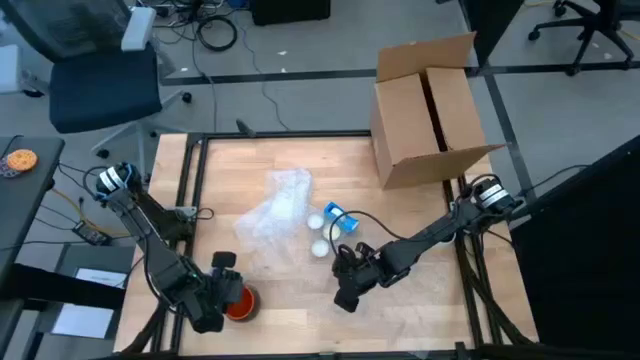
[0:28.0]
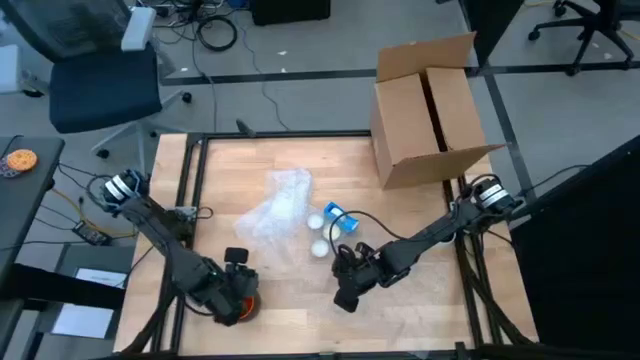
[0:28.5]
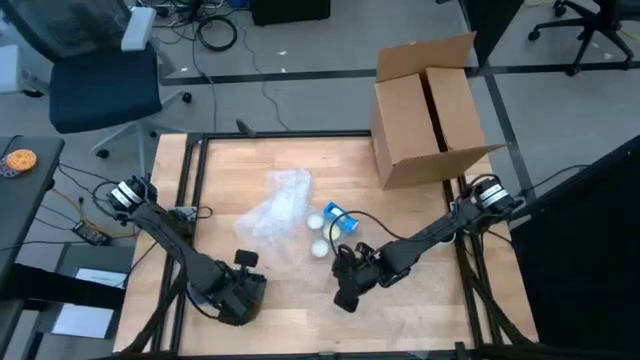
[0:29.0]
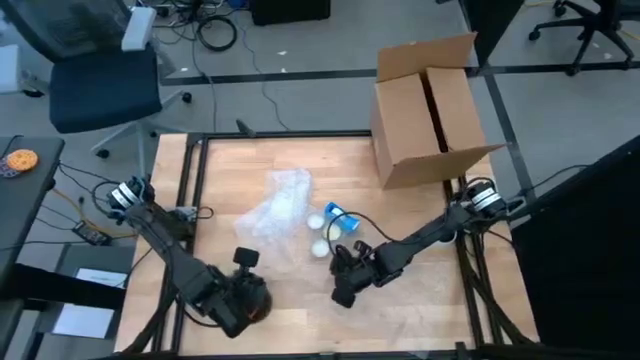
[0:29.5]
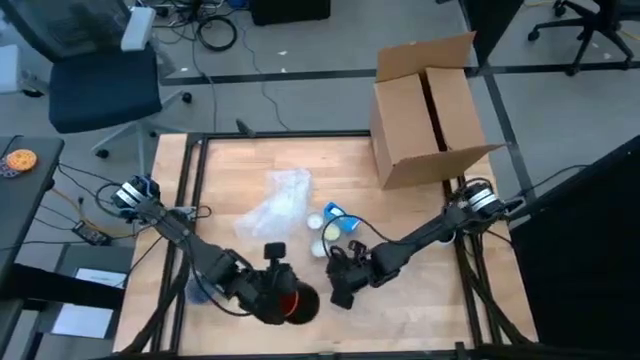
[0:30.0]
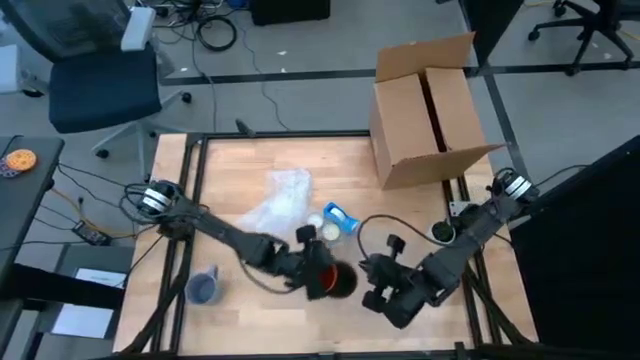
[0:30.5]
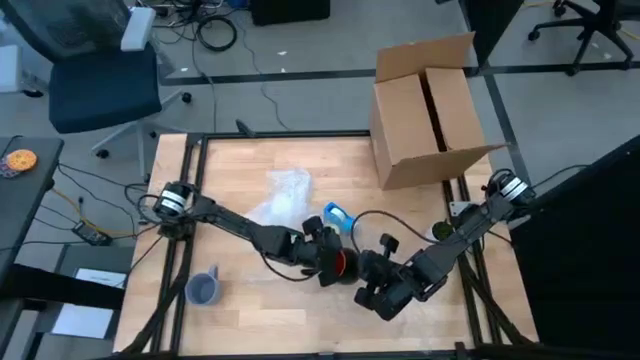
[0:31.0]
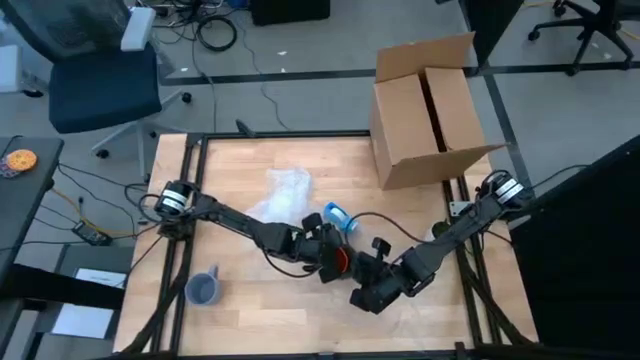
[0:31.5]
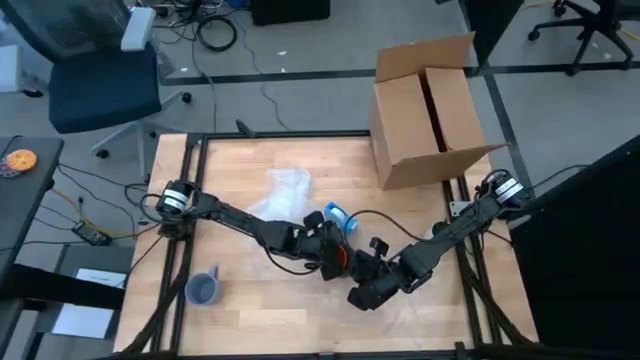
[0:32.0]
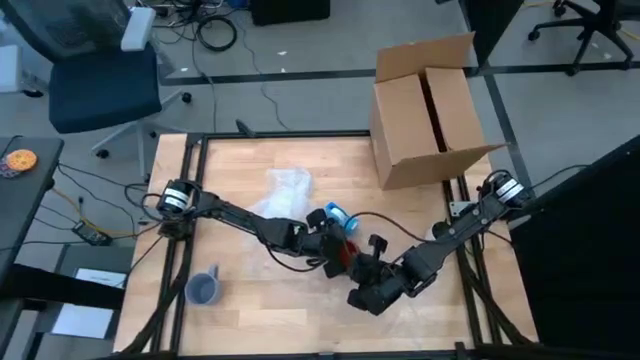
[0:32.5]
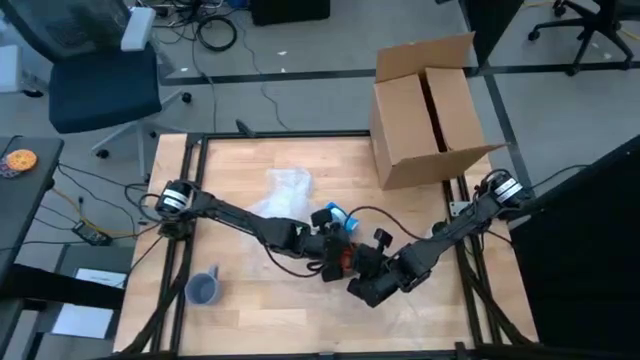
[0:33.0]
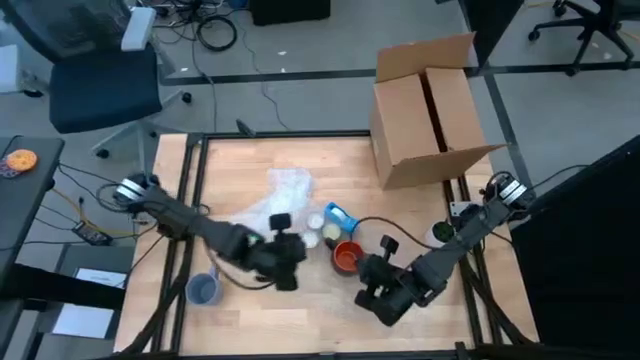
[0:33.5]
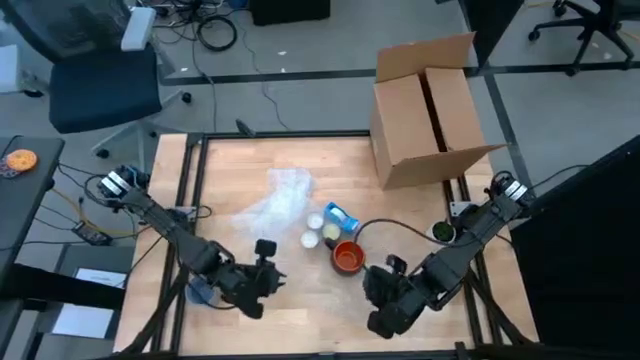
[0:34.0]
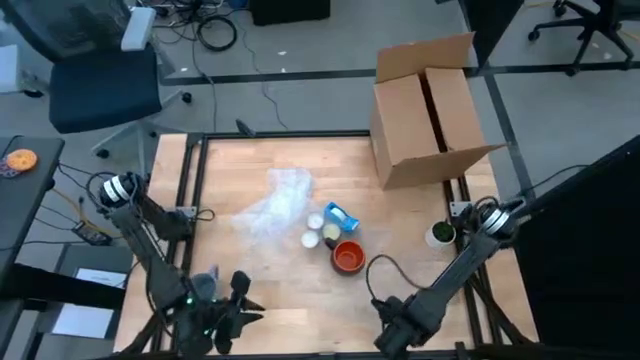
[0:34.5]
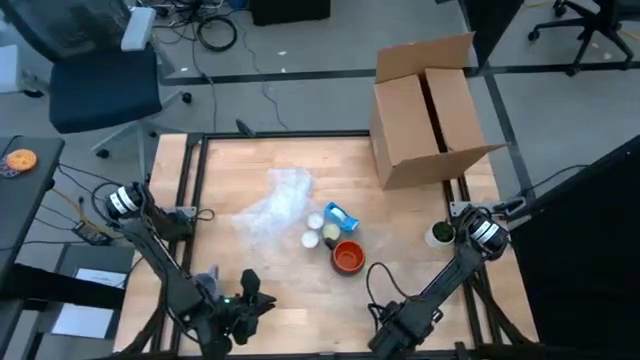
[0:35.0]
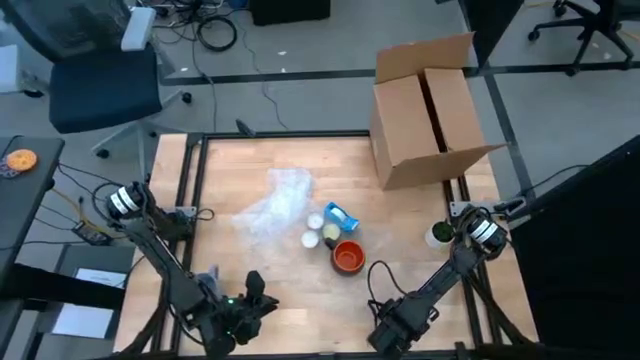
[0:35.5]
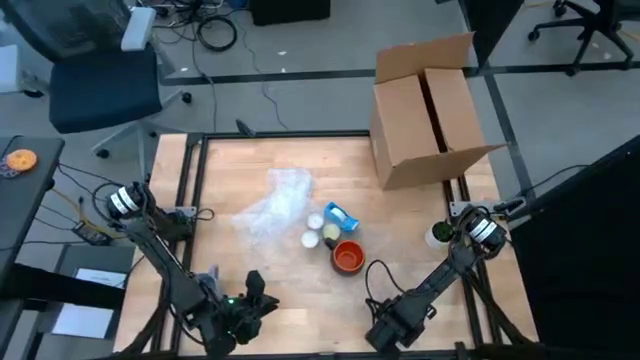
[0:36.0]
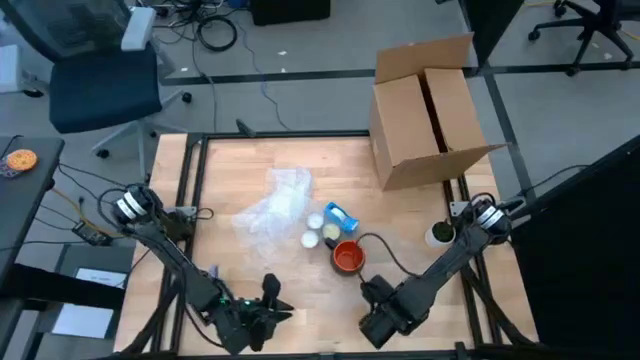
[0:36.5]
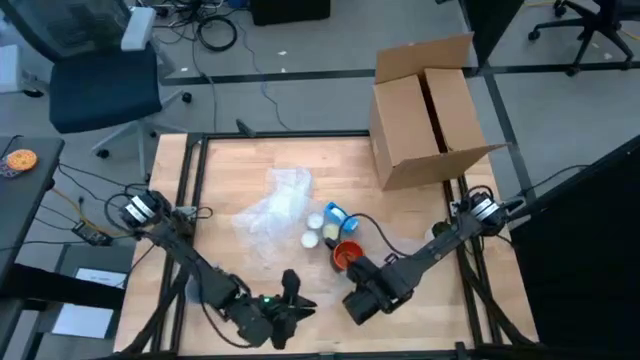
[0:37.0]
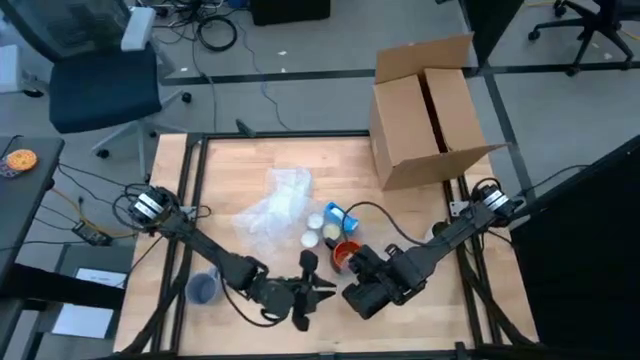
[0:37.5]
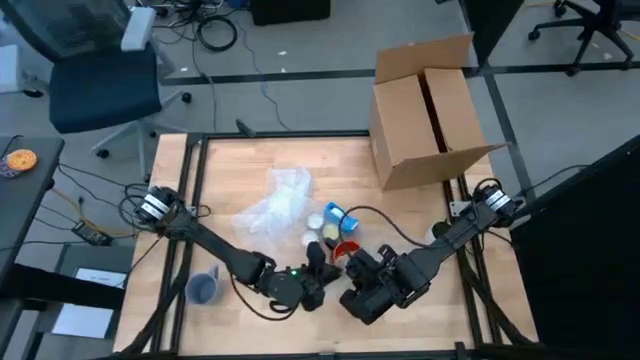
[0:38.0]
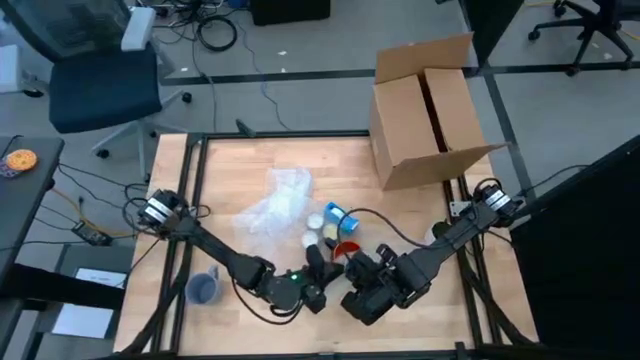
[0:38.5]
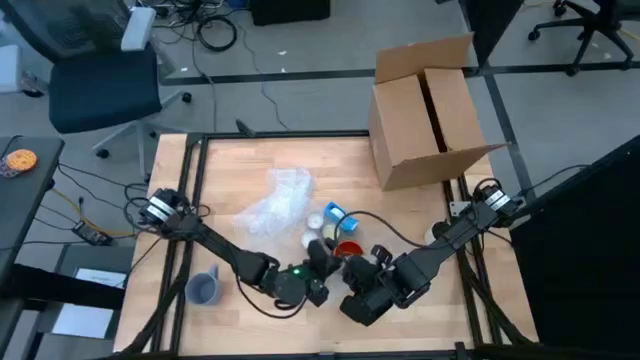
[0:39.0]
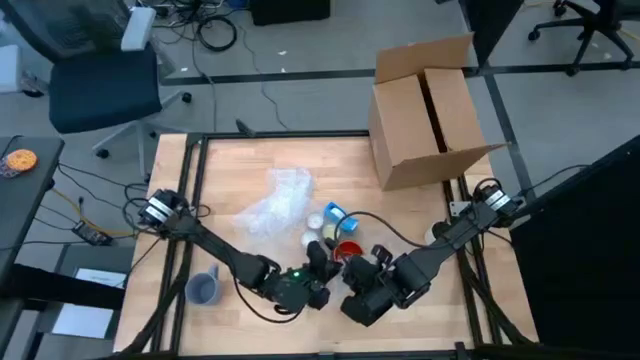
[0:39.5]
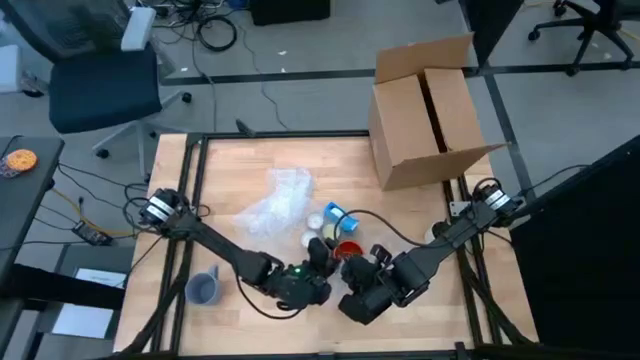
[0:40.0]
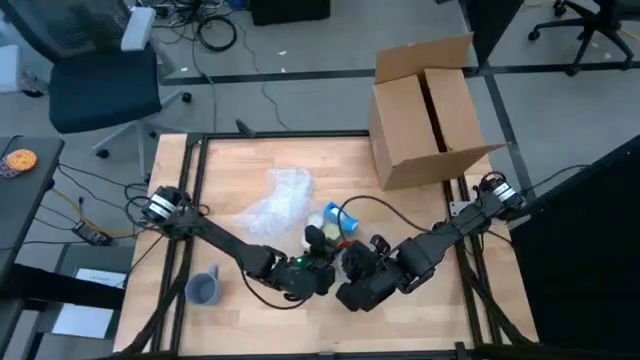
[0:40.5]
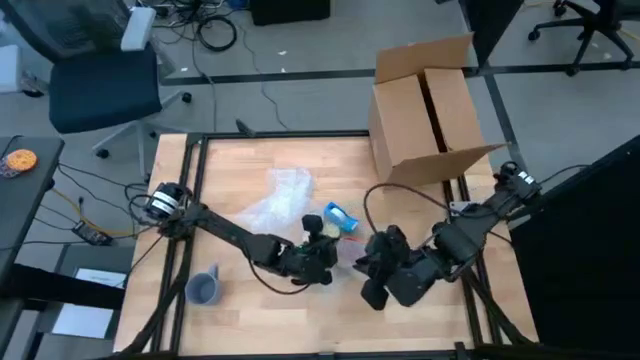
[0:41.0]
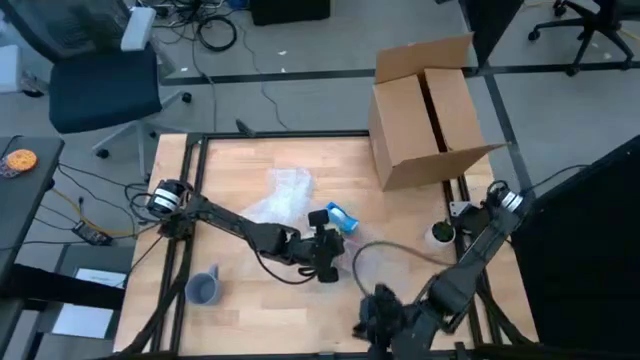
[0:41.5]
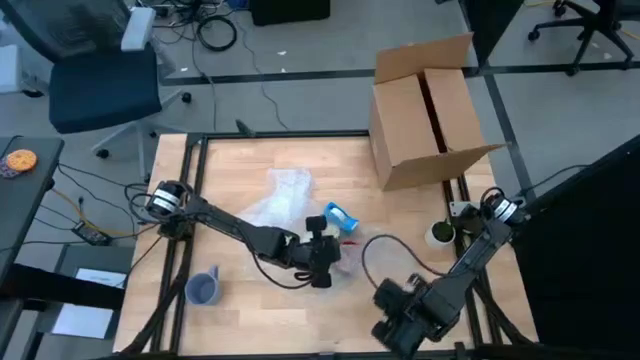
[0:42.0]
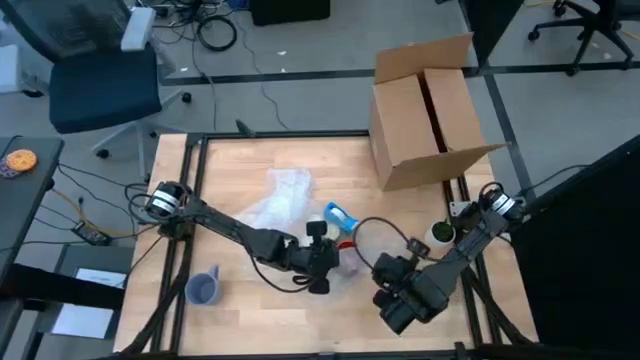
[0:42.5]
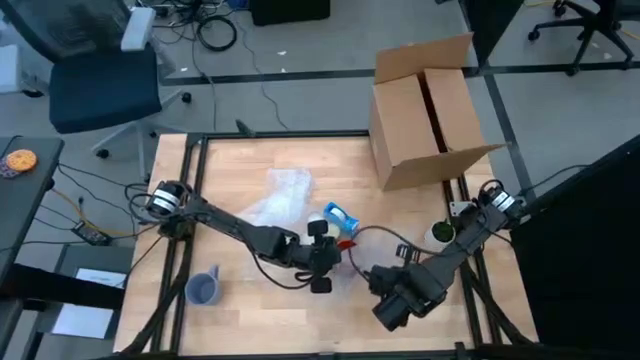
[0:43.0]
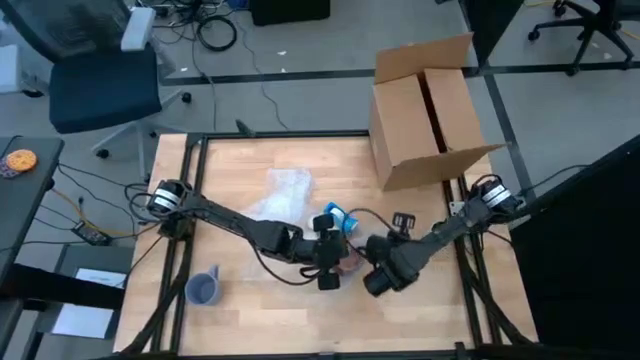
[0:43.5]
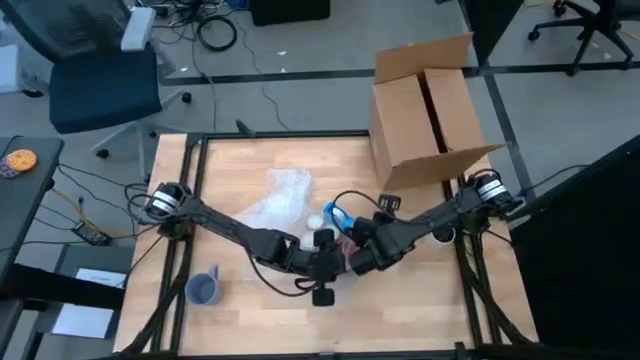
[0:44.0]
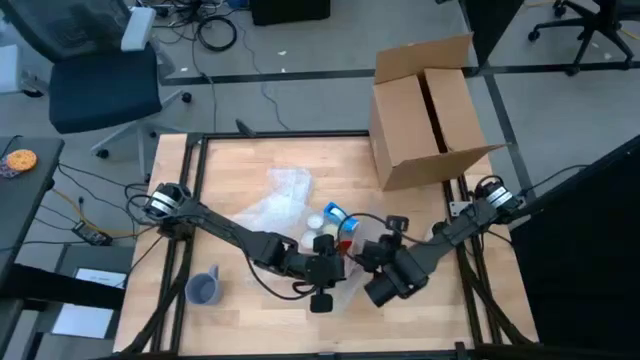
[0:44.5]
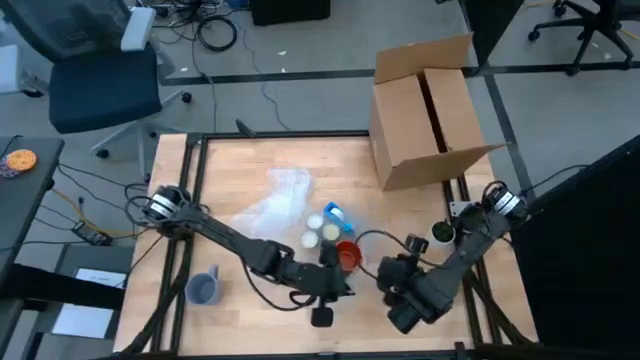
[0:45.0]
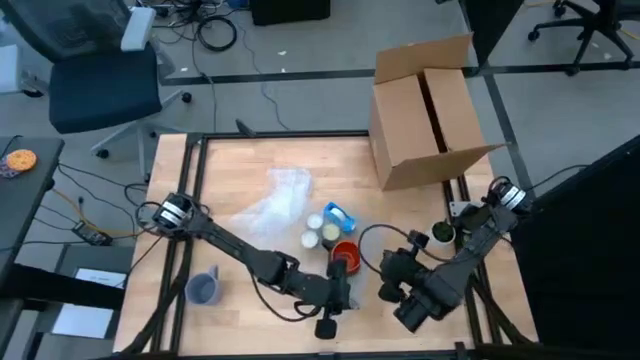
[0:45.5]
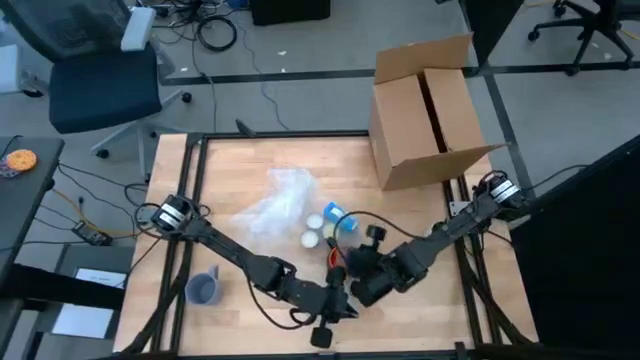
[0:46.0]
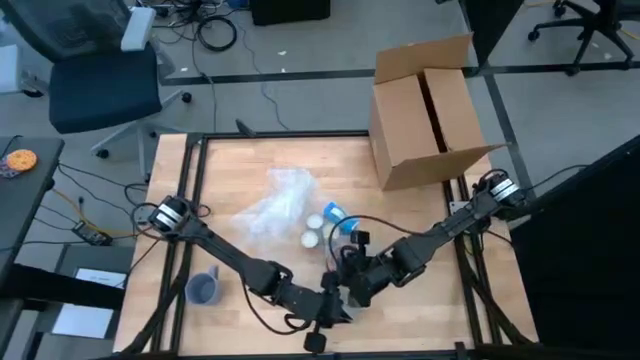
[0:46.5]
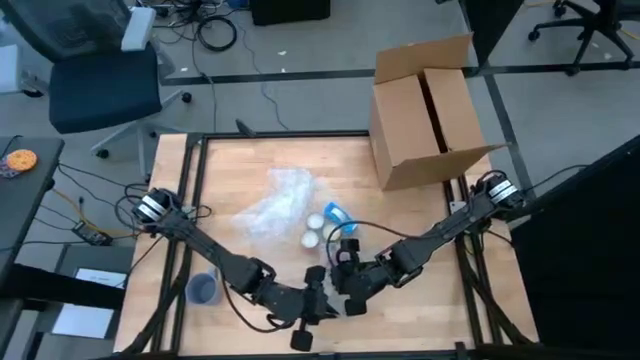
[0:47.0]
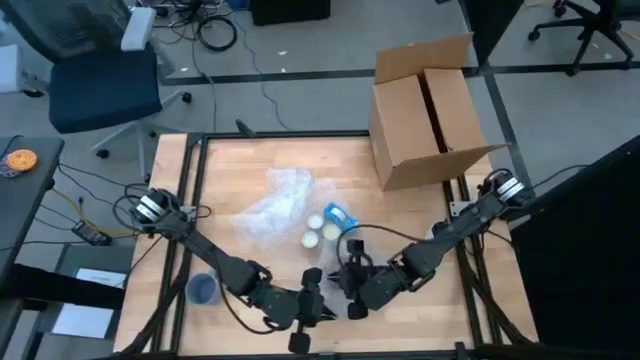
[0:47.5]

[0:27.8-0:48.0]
Task: wrap mug
Wrap the black mug with the transparent bubble wrap

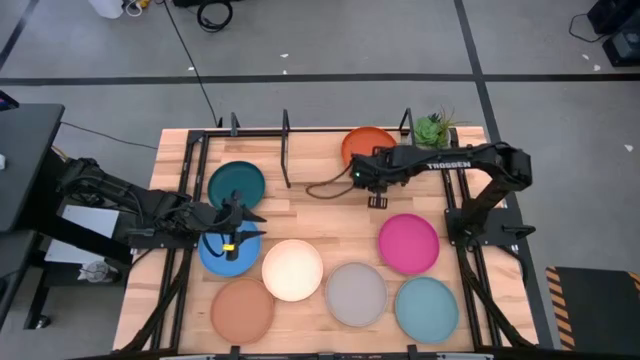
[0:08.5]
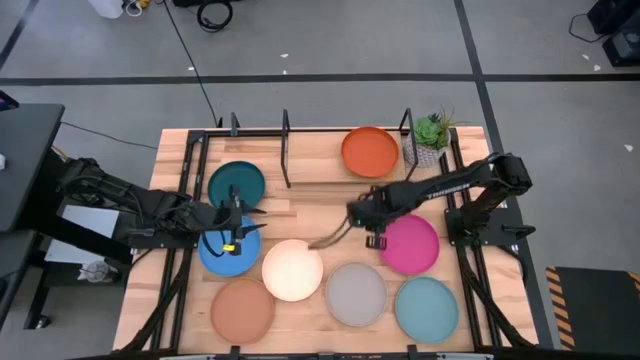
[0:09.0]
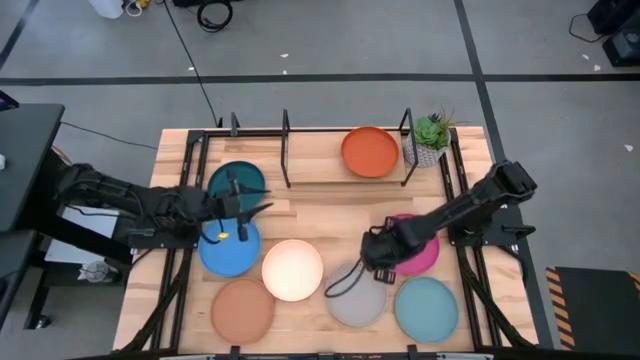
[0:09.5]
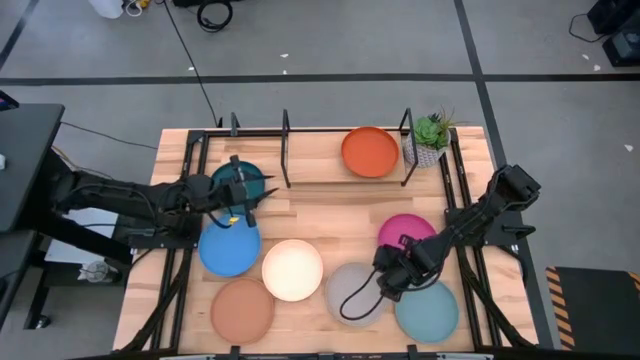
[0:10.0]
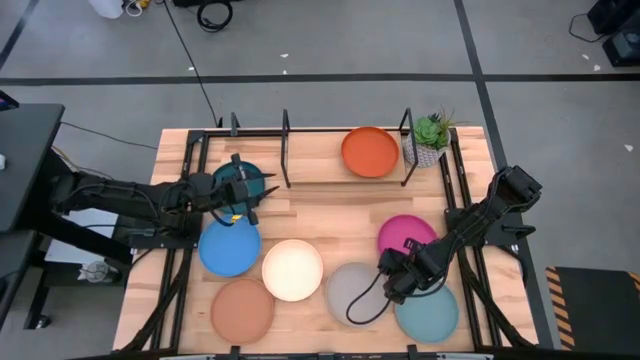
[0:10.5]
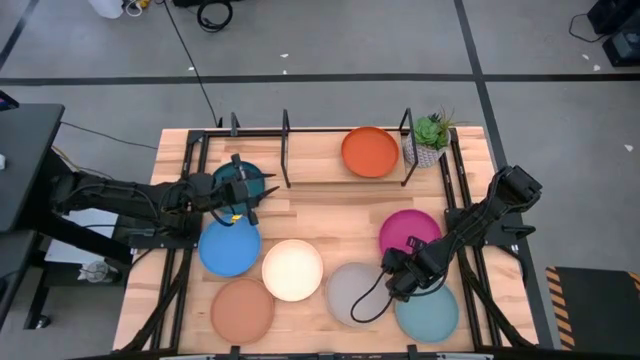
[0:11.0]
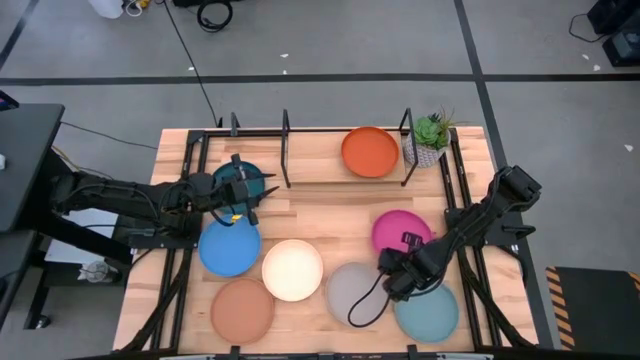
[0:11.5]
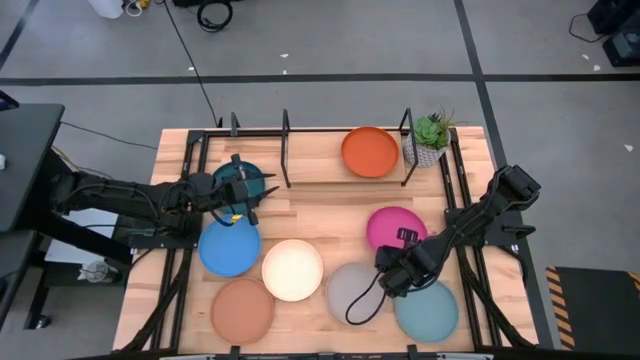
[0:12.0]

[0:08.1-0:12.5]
Task: Place and stack plates onto a shelf
Stack the pink plate on the orange plate on the shelf
